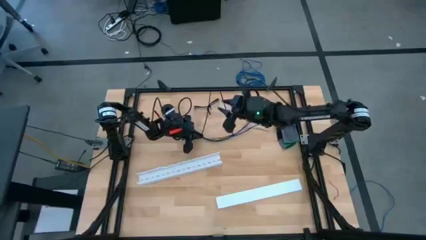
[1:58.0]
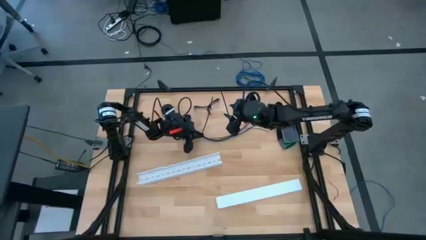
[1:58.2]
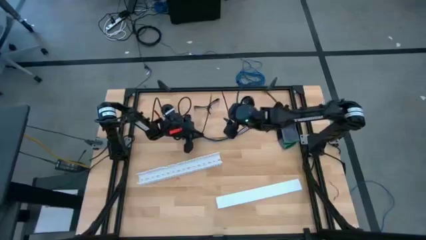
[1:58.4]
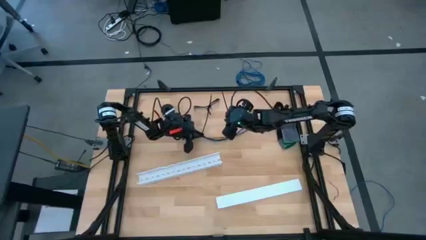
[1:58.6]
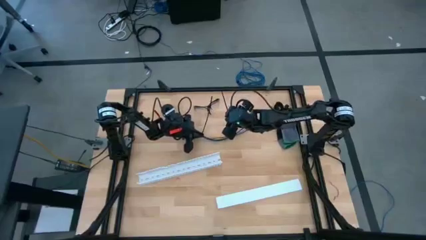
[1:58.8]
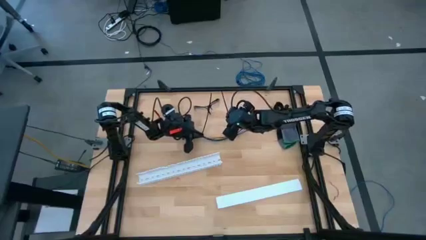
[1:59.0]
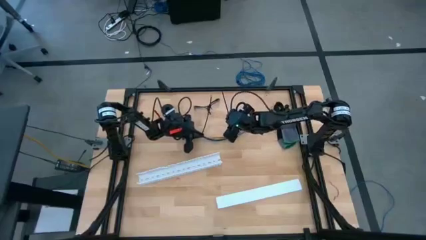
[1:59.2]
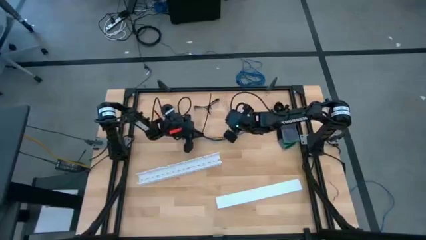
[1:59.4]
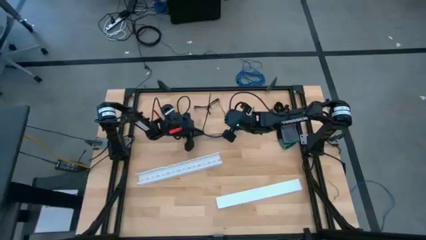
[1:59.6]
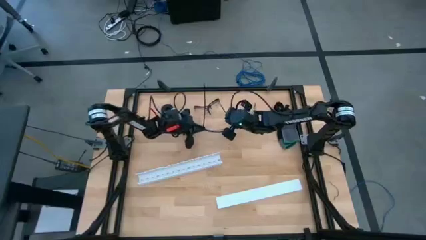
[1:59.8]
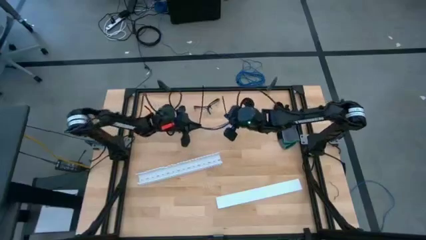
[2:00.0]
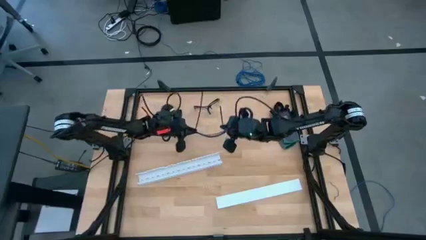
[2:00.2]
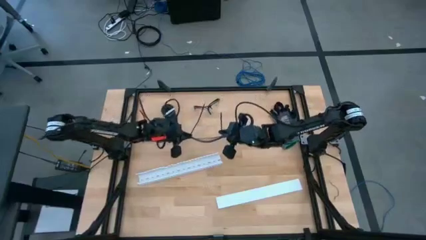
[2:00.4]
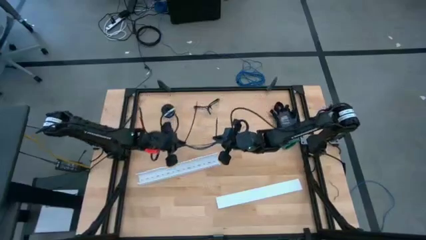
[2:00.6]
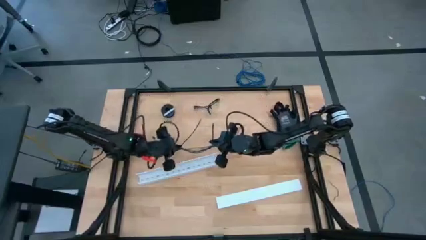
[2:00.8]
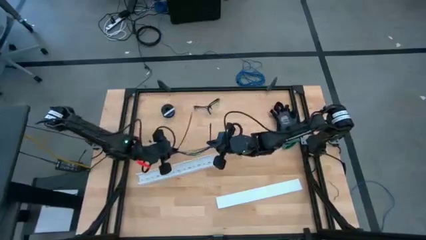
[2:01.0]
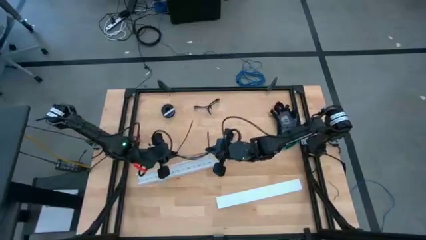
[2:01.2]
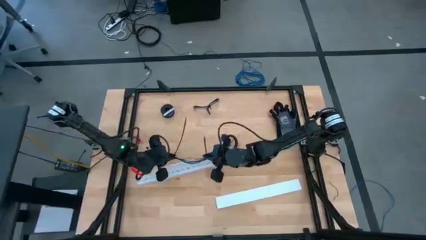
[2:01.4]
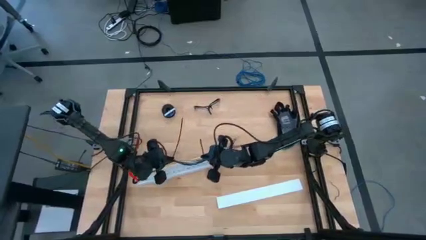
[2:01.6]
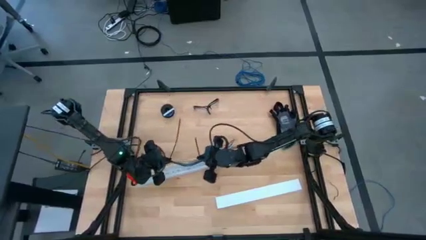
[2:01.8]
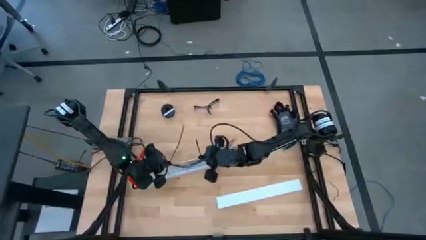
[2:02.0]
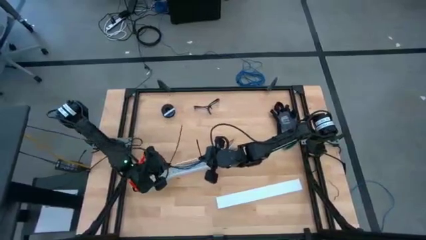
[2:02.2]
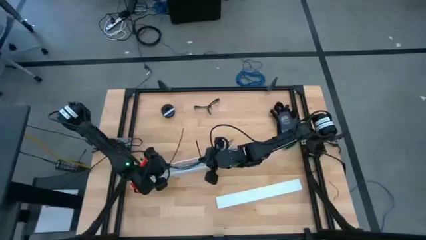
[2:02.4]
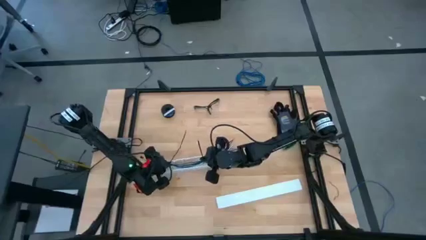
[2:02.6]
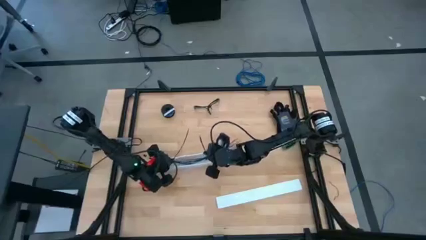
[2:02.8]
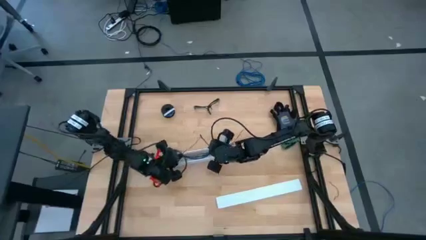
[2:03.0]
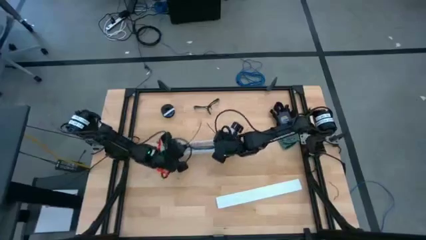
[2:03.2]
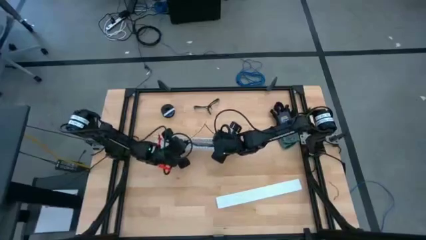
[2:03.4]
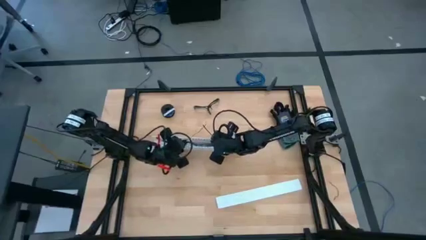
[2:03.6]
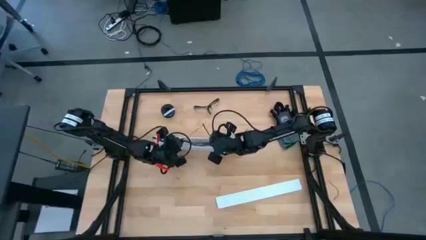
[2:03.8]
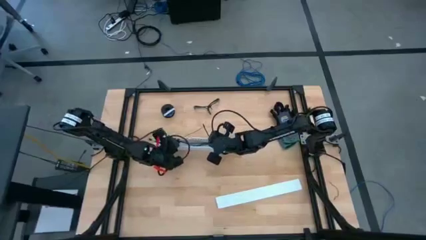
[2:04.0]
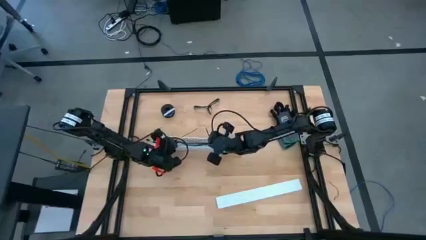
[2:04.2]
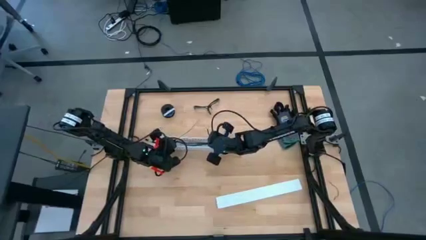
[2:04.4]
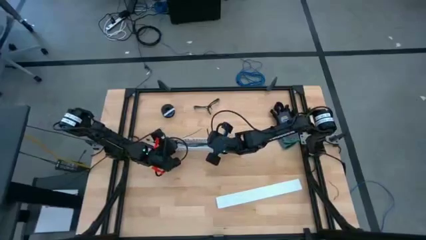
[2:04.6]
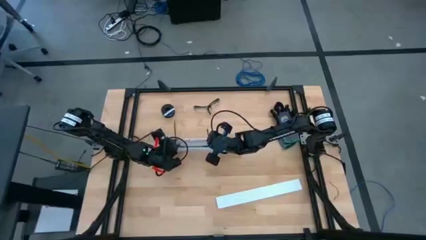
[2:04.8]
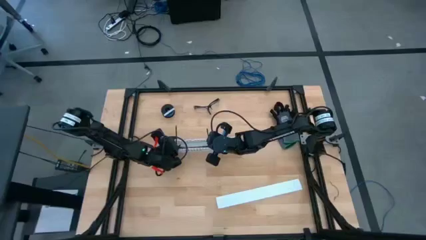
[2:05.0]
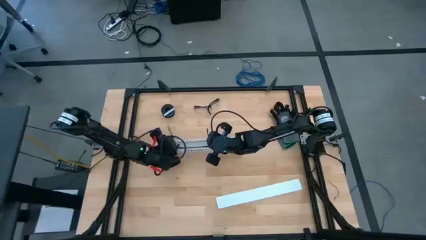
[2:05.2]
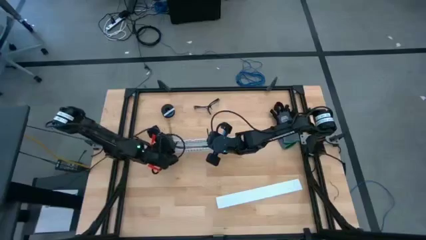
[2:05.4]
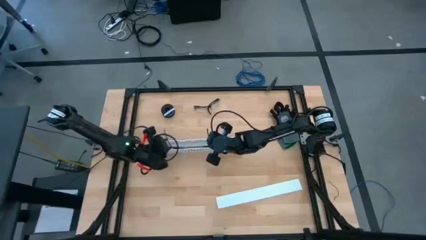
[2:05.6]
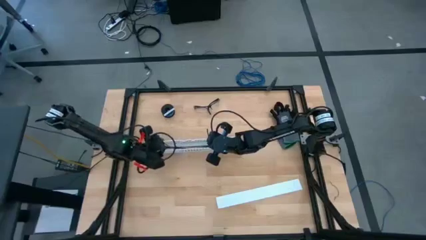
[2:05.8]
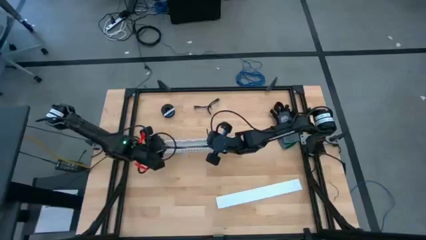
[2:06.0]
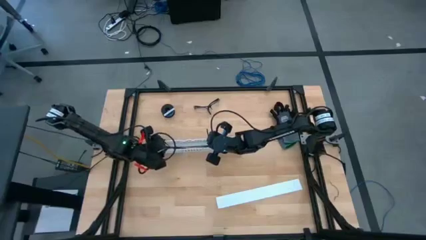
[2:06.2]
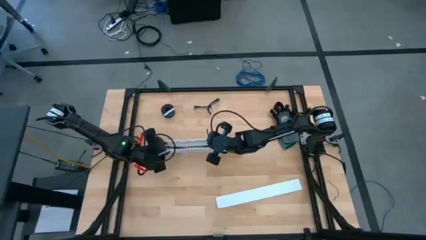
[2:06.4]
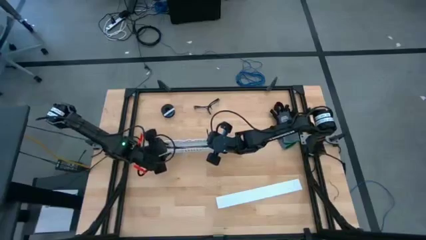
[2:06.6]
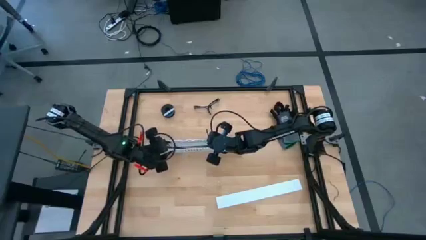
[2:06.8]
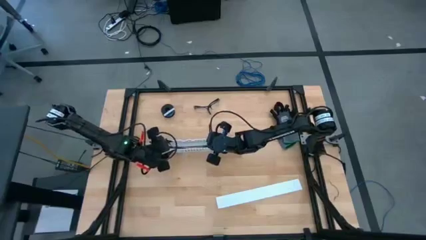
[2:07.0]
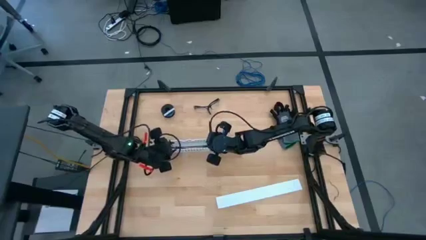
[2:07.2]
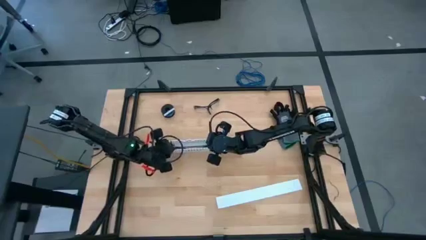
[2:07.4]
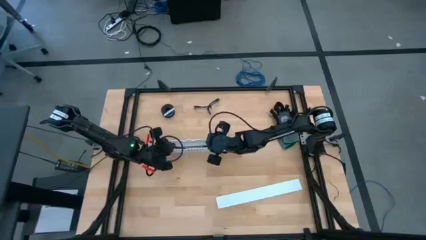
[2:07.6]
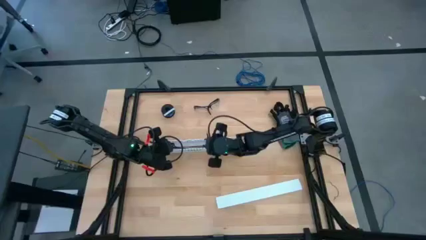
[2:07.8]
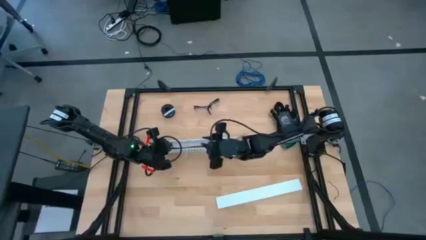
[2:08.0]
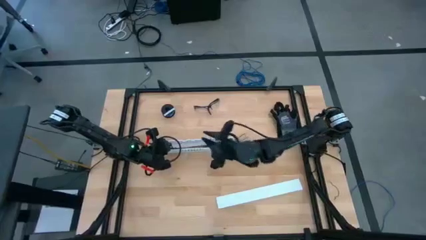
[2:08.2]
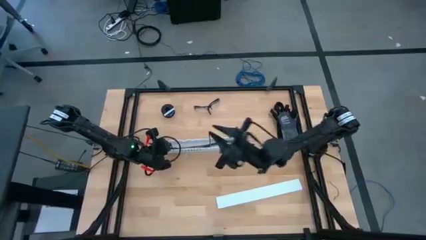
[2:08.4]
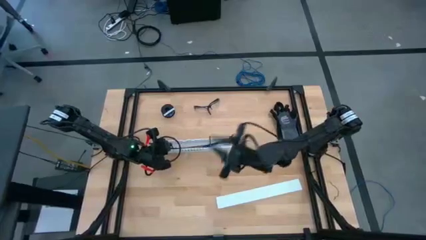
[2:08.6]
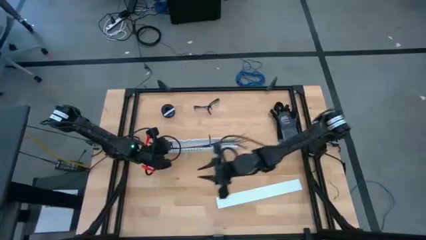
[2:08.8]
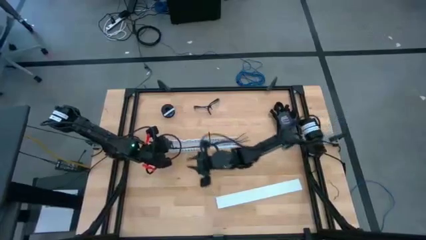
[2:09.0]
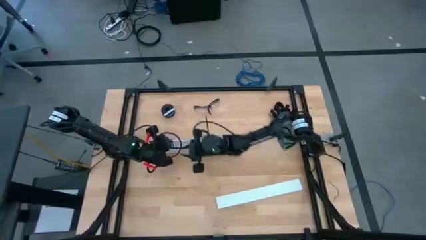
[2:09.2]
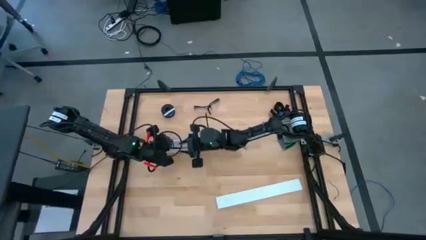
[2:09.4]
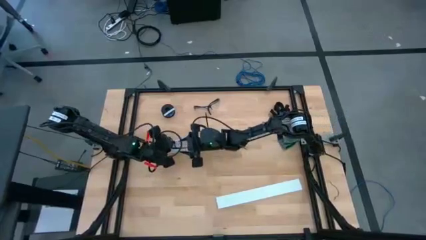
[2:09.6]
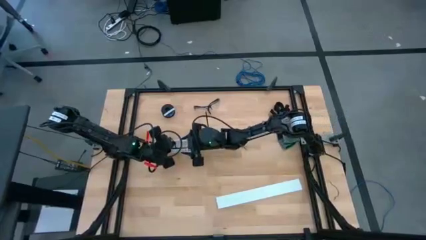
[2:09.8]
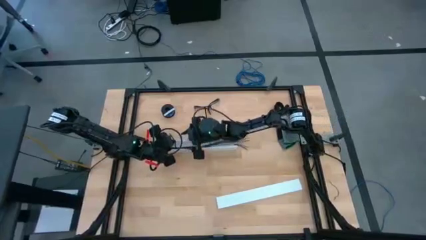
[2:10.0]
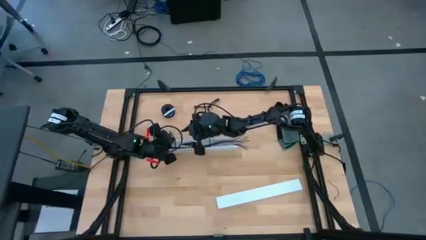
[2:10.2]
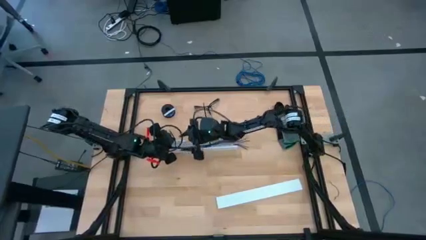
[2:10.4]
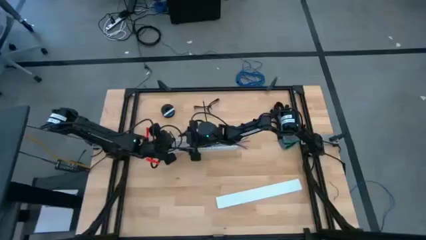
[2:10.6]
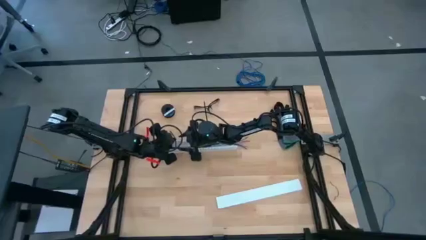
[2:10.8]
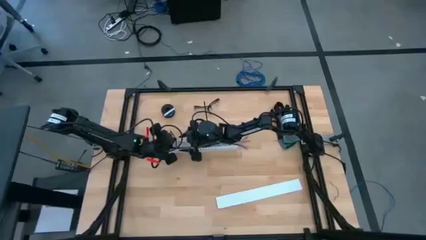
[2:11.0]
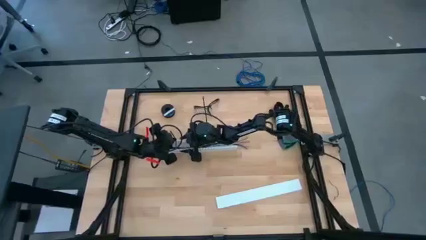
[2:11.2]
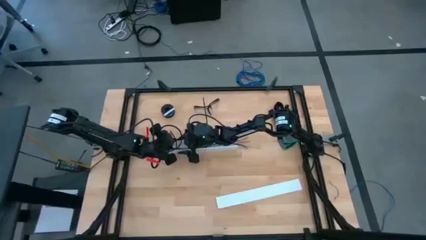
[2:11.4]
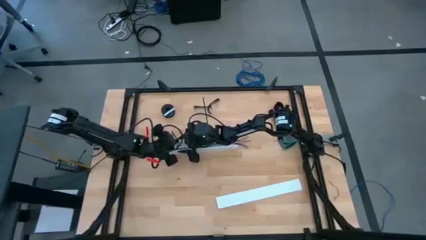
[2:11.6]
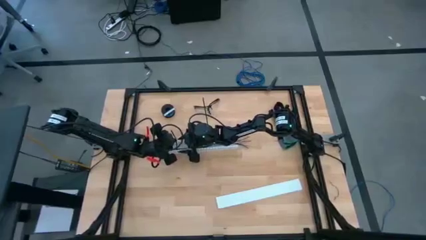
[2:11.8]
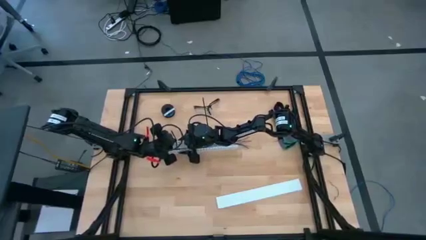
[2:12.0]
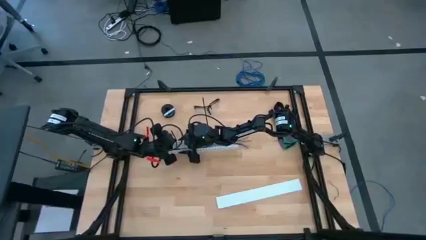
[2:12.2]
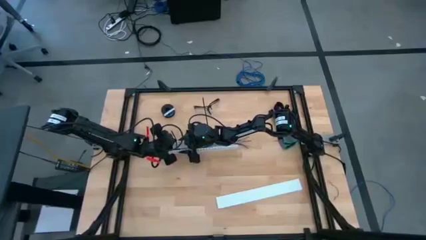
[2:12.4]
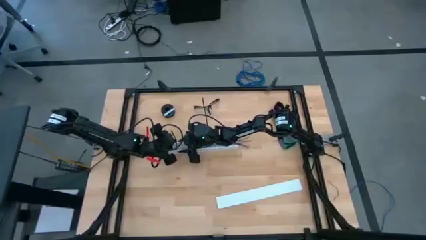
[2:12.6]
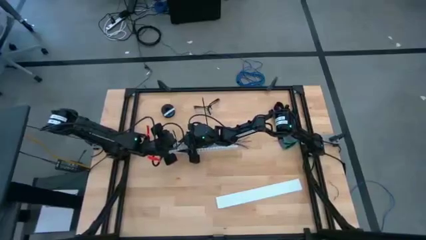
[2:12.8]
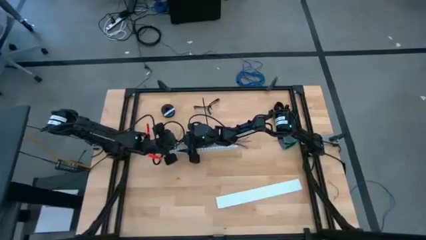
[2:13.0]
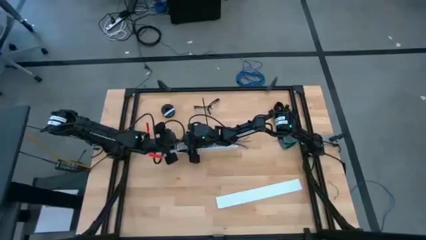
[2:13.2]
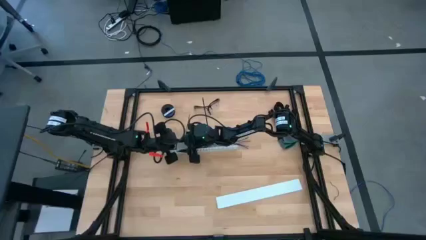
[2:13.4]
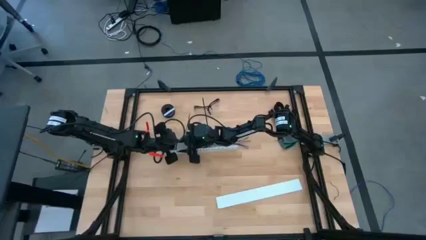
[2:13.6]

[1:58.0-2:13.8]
Task: Ziptie cables
Put the zip tied cable wires into the white cable duct

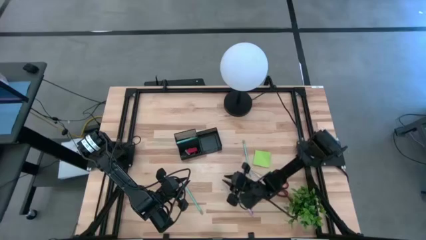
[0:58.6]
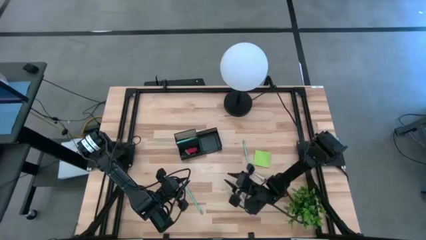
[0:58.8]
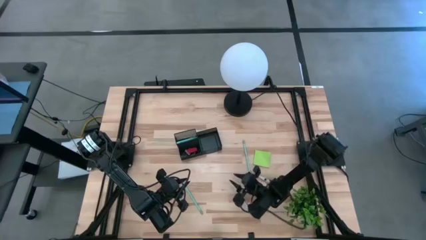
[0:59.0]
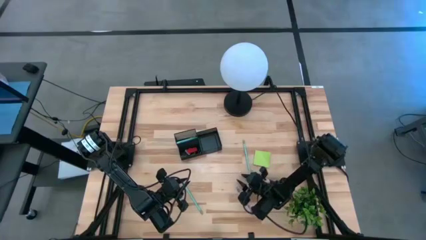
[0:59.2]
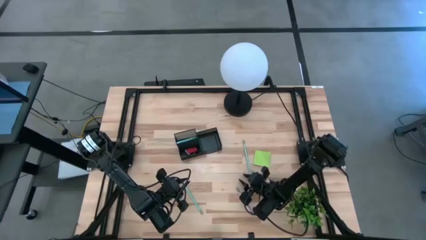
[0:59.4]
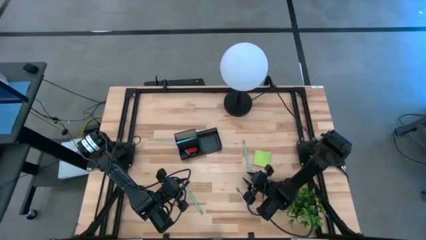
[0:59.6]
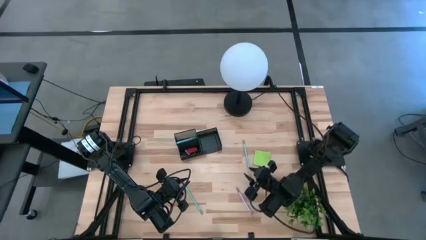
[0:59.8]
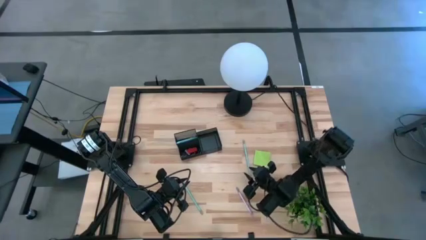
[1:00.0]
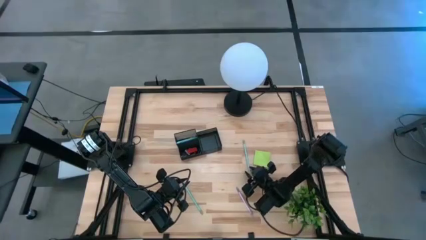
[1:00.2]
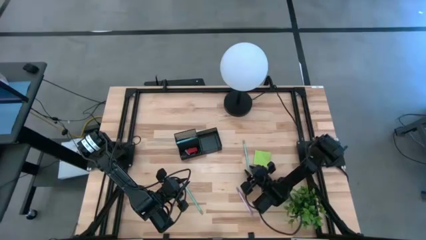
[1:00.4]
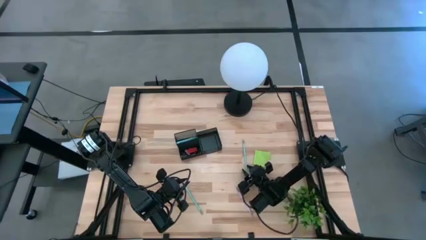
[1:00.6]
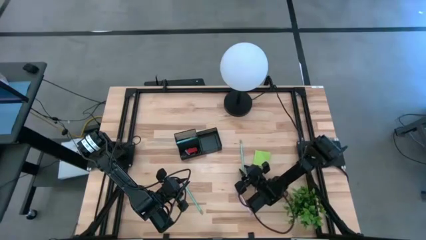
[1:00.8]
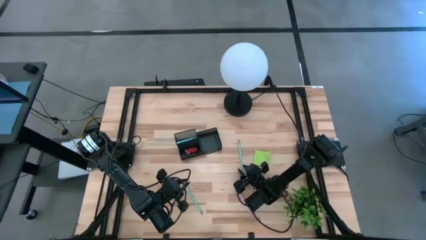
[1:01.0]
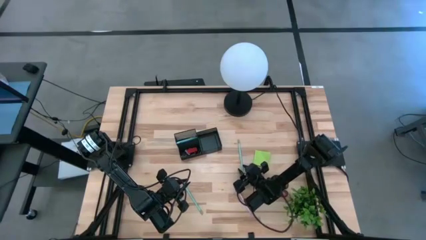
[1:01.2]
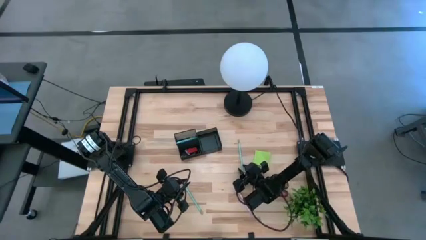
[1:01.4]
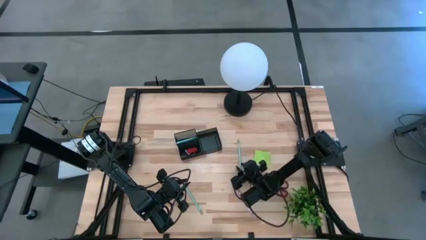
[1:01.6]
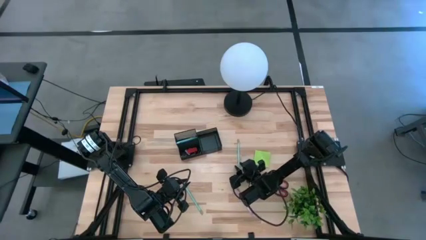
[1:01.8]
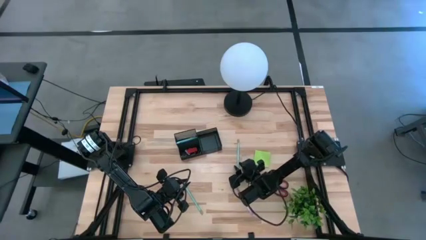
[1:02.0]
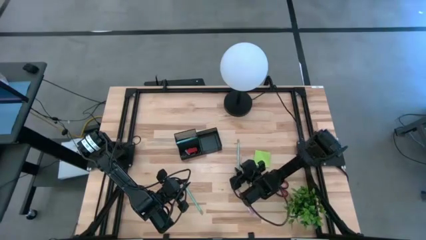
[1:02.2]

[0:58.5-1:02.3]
Task: Pick and place office supplies into organizer
Adjust the right blue pencil
